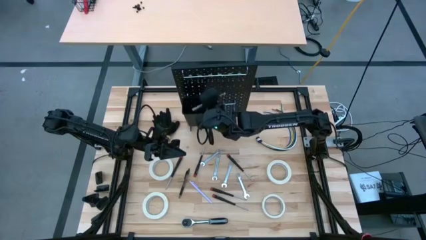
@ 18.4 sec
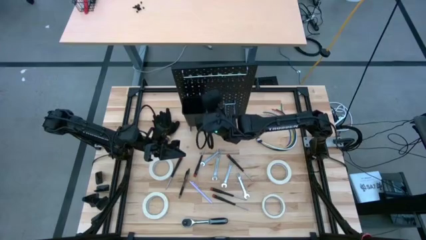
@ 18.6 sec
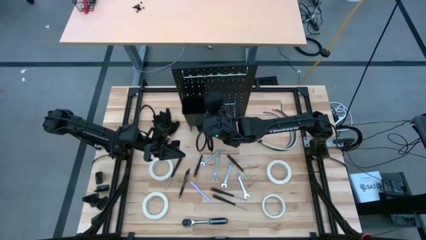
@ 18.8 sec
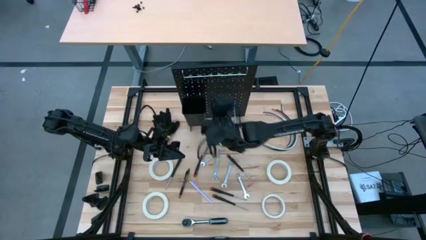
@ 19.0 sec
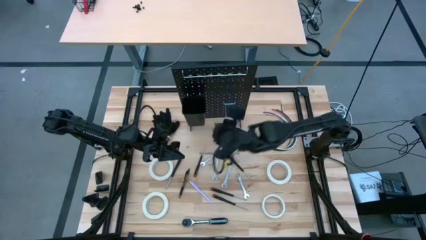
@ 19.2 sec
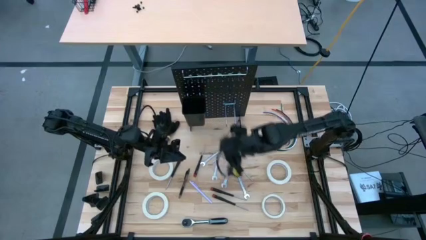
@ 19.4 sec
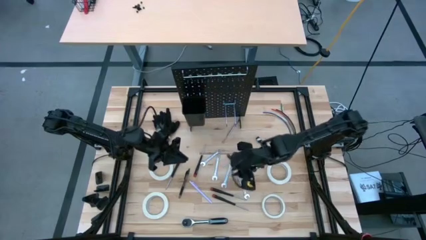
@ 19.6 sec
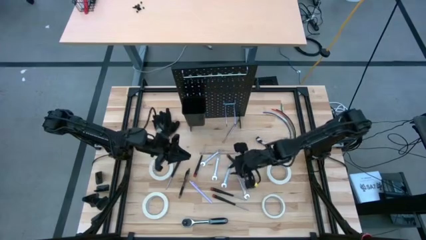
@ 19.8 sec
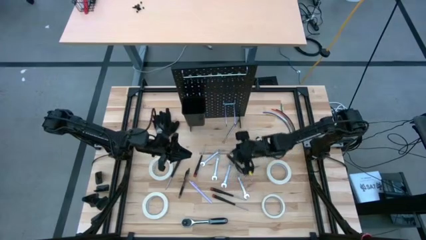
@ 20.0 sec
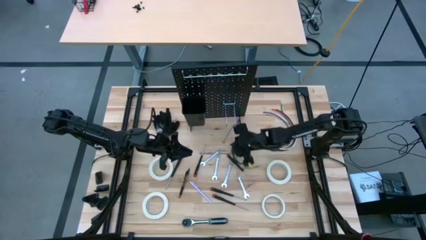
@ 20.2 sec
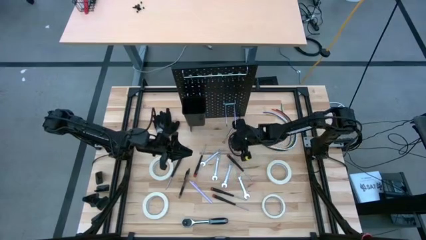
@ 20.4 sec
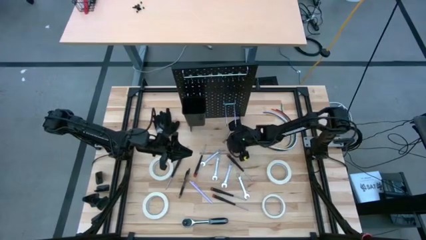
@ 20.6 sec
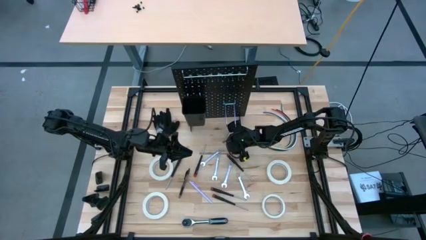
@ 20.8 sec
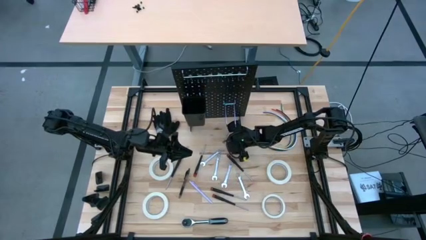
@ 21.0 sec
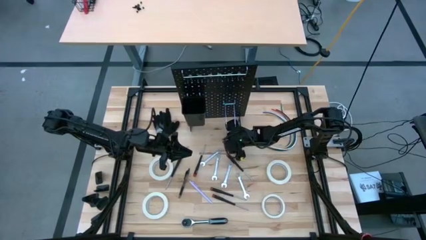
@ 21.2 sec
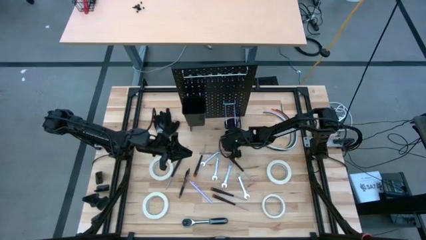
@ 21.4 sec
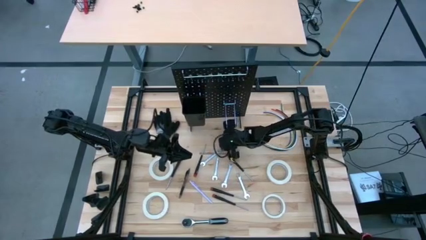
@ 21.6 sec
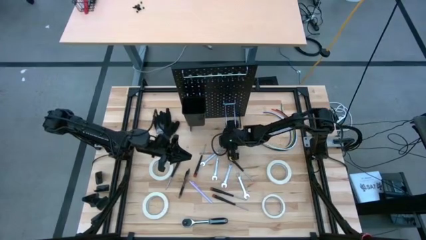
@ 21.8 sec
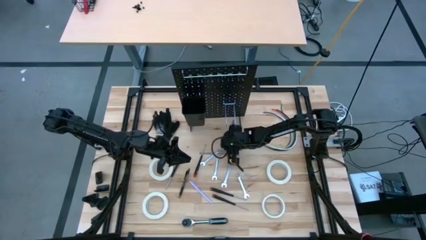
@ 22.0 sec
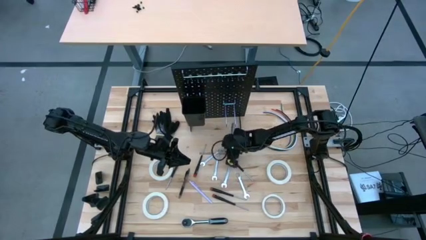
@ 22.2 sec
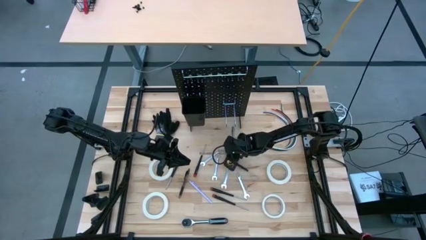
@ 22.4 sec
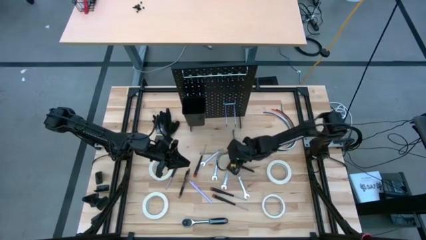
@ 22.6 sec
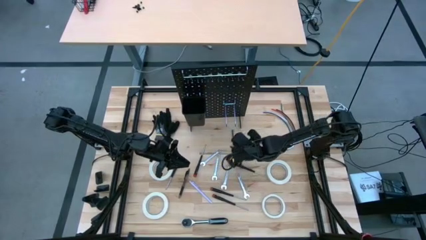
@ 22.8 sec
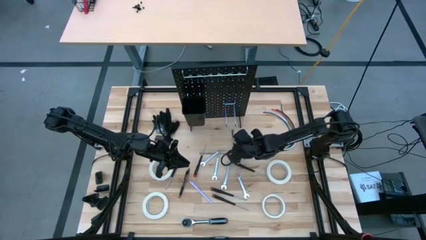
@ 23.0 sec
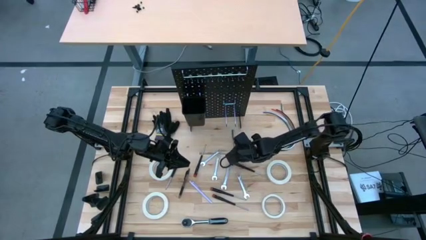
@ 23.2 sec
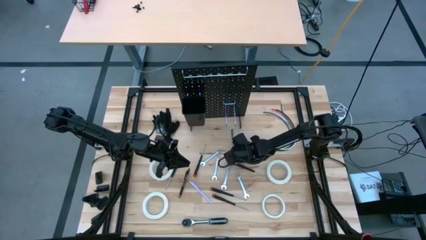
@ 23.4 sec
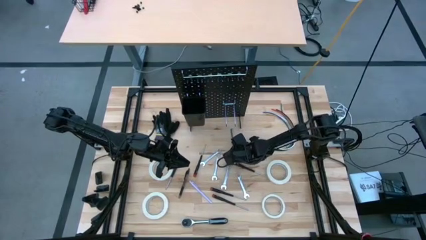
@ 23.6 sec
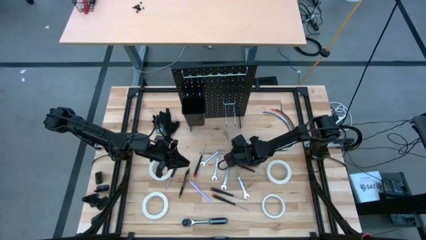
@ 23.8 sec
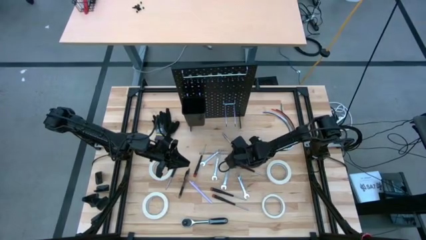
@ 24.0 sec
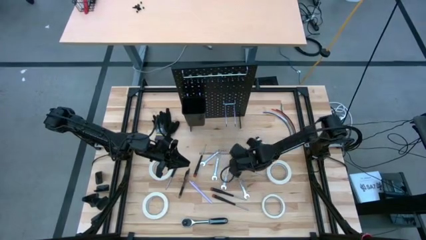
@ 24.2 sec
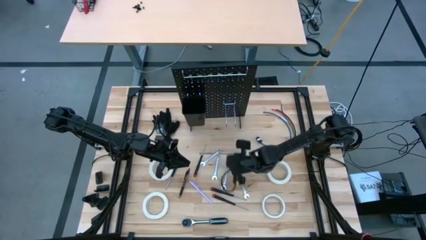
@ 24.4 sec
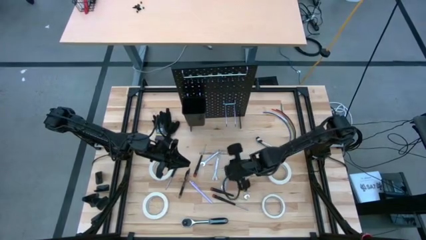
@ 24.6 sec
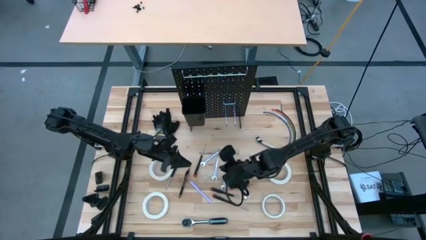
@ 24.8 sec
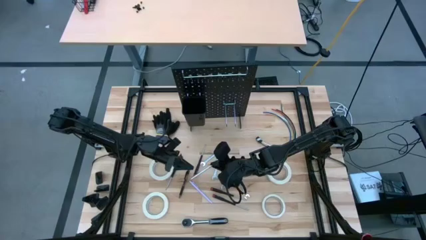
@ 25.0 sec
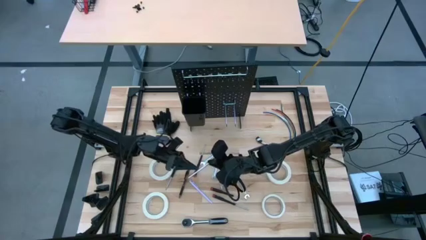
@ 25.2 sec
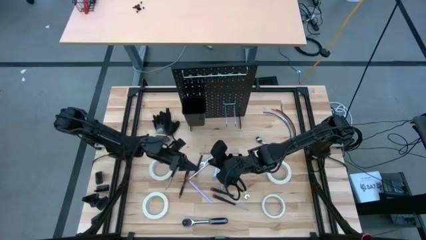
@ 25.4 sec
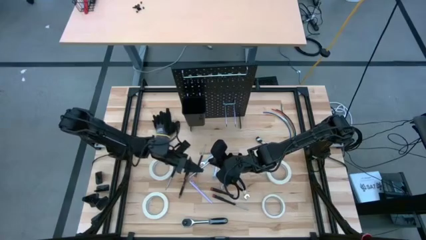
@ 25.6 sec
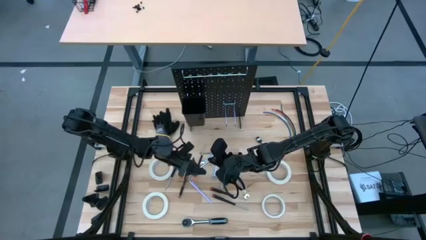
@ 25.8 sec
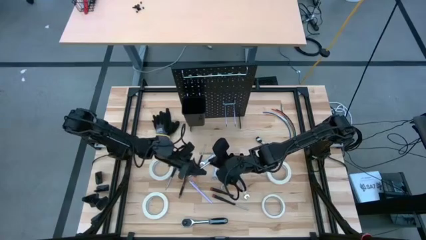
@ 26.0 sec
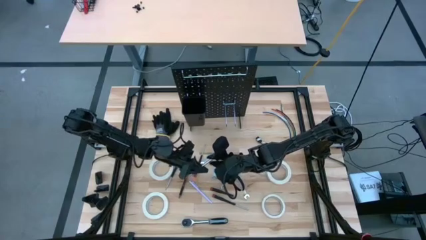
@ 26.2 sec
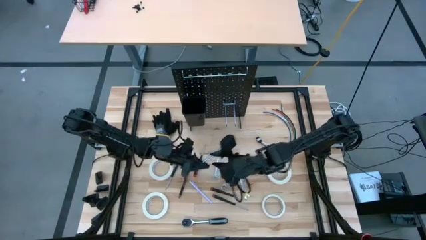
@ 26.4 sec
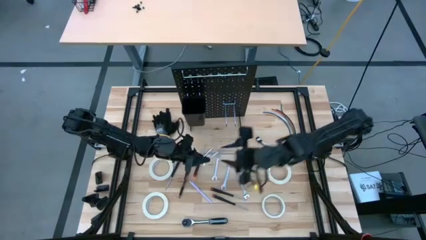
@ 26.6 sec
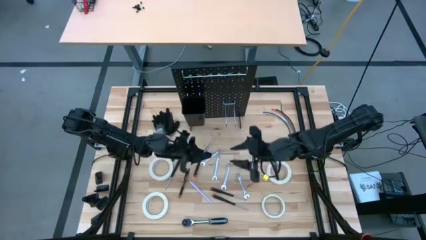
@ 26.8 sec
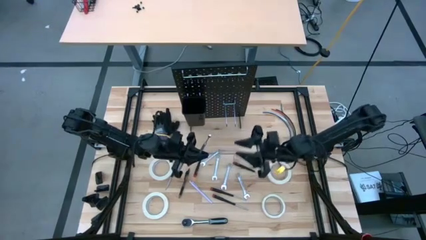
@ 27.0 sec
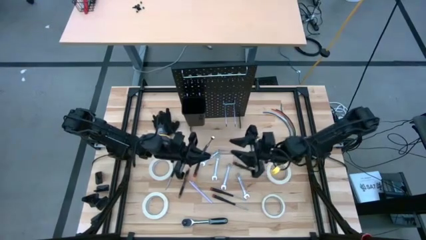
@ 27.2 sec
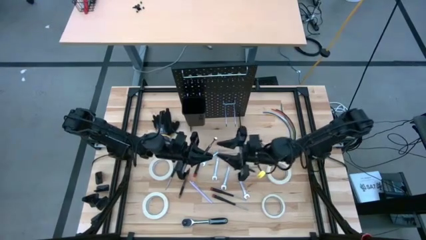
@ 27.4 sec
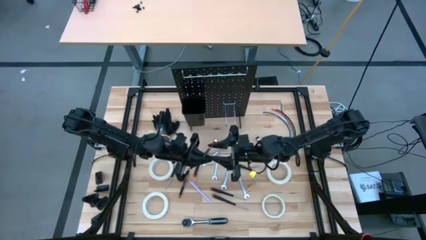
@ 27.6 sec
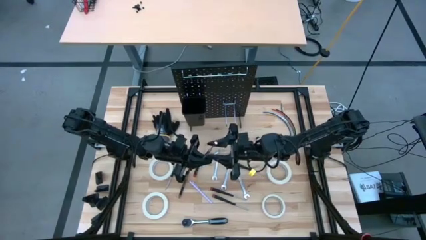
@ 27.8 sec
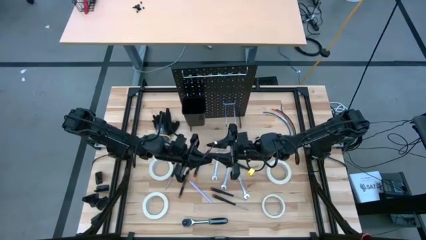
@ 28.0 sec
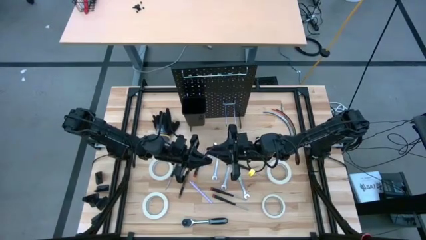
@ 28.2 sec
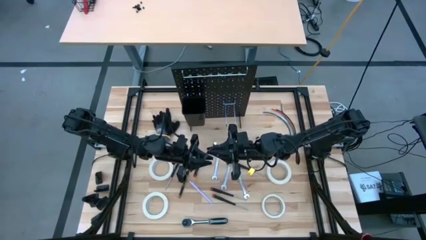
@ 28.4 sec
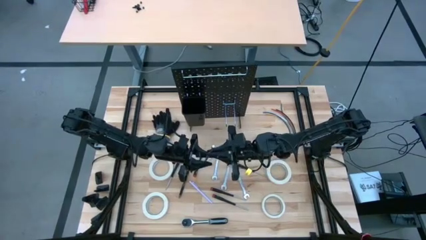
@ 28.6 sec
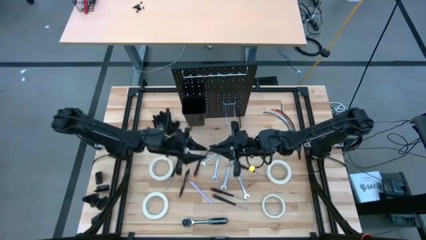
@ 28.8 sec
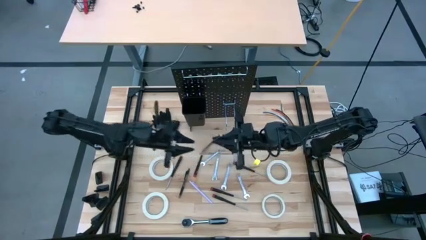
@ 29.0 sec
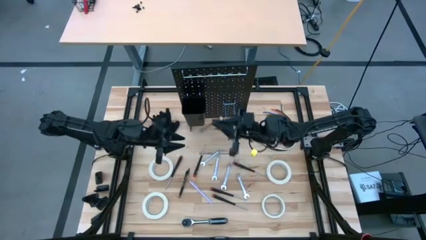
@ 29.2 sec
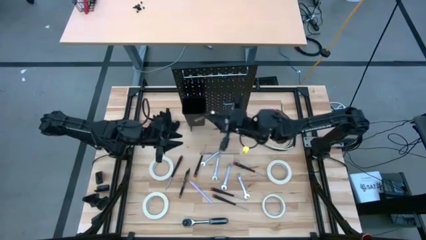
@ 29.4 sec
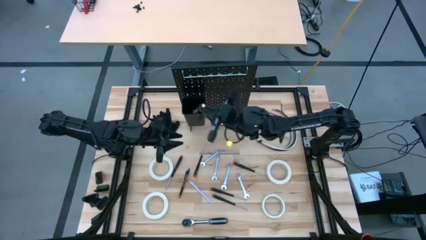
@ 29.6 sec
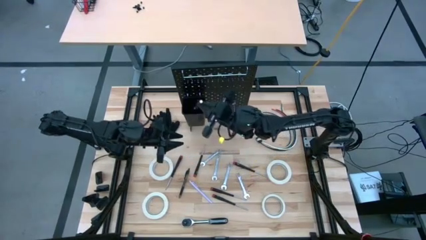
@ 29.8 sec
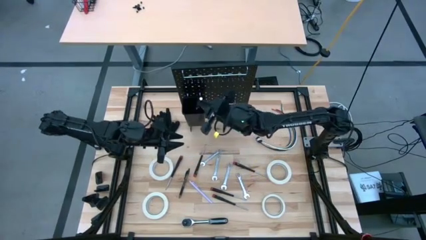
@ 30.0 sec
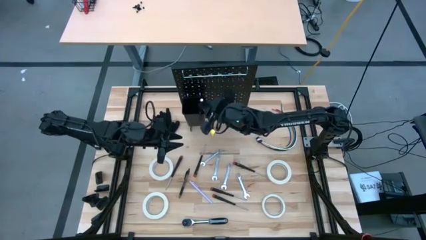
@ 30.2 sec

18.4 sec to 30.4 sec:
Task: Hang tools onto peg board
Put the silver magnetic rod into the black bin on the peg board
